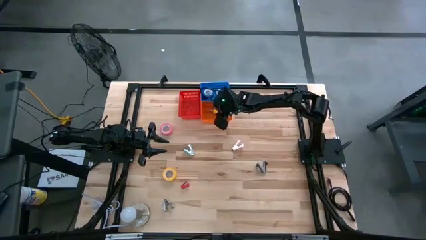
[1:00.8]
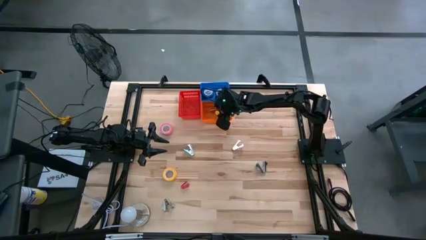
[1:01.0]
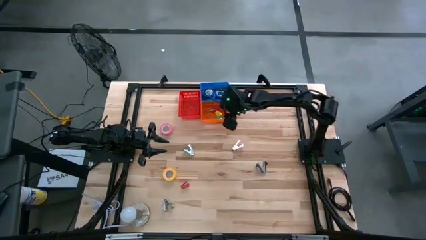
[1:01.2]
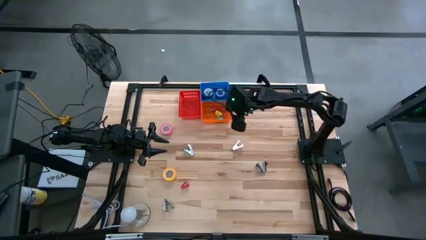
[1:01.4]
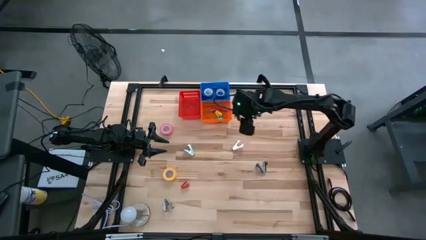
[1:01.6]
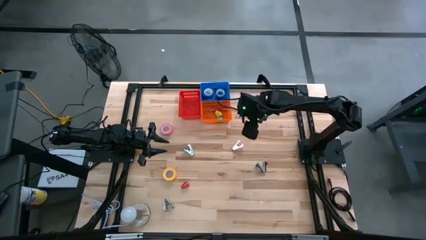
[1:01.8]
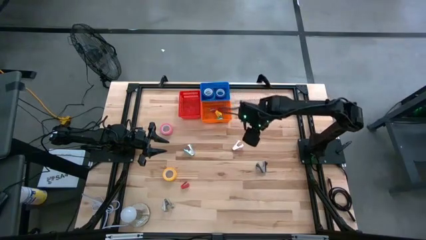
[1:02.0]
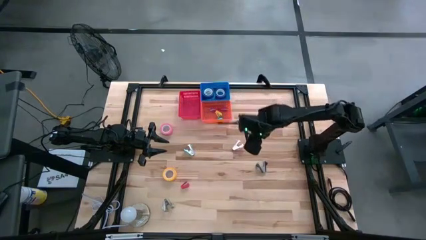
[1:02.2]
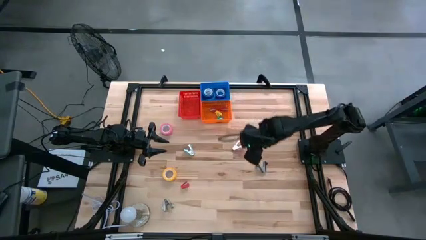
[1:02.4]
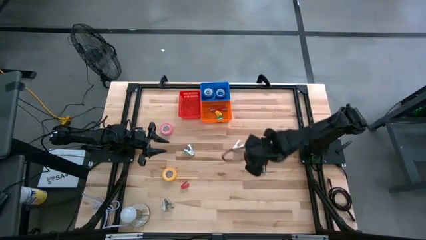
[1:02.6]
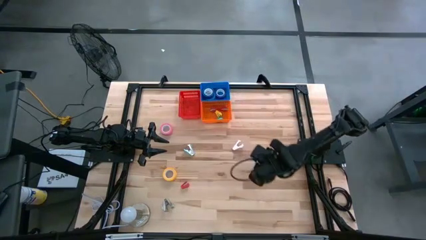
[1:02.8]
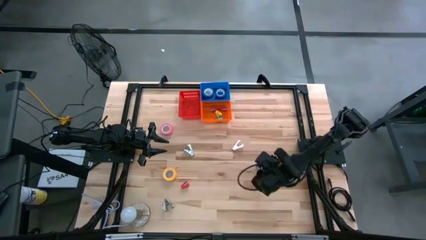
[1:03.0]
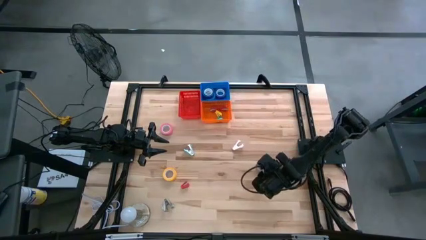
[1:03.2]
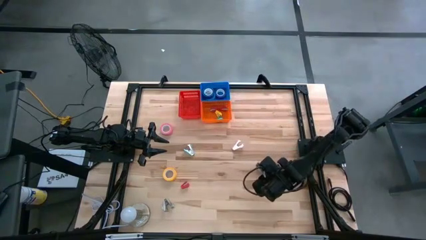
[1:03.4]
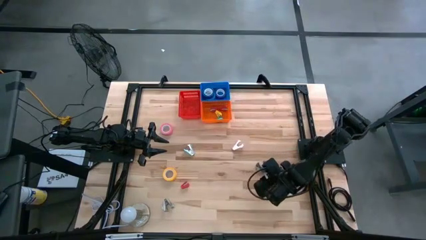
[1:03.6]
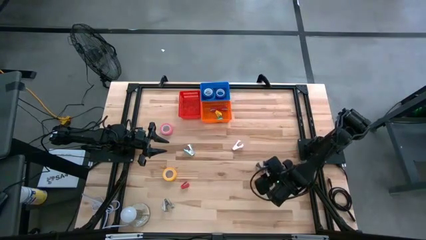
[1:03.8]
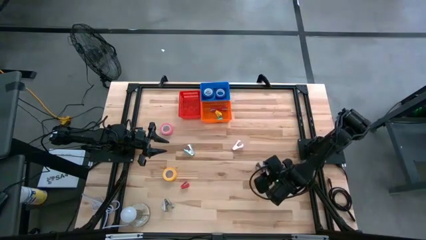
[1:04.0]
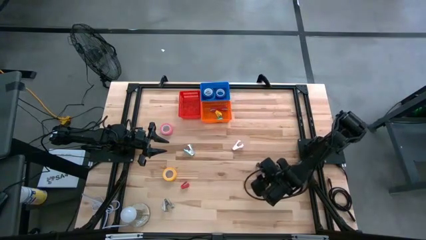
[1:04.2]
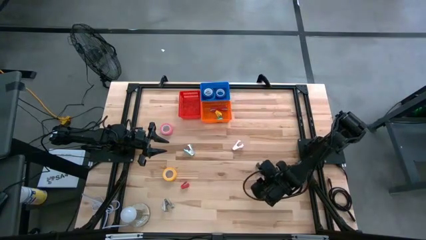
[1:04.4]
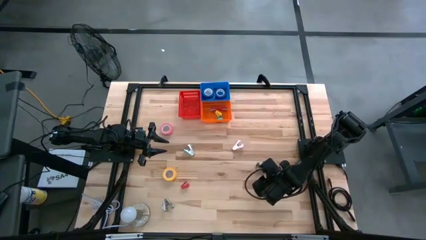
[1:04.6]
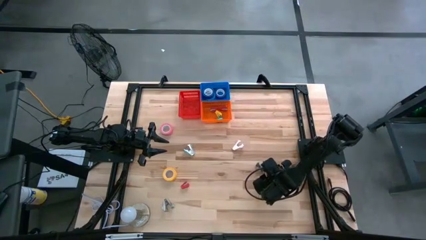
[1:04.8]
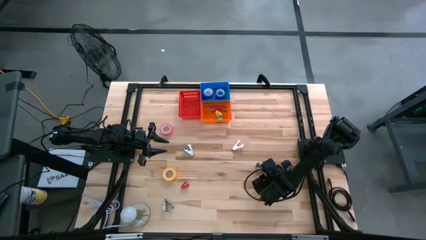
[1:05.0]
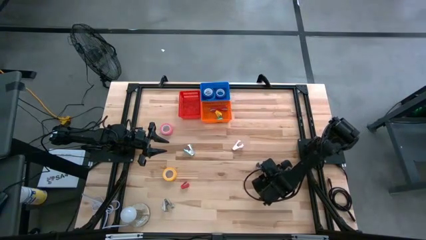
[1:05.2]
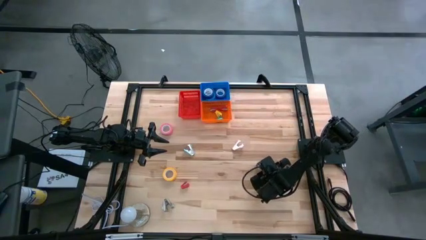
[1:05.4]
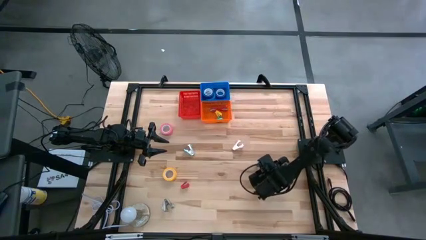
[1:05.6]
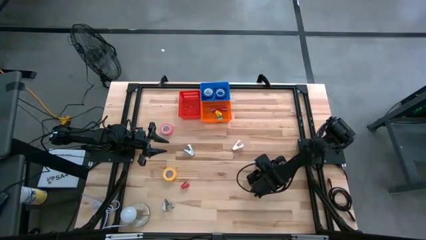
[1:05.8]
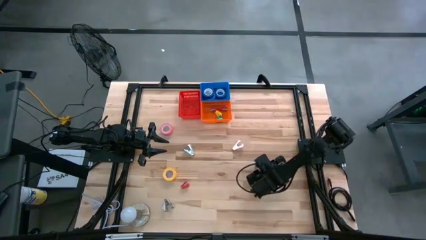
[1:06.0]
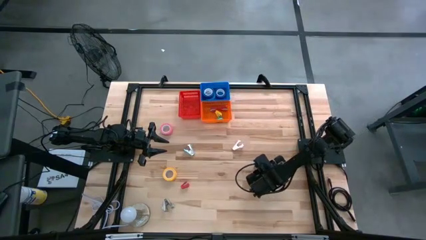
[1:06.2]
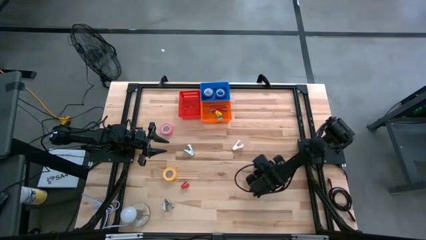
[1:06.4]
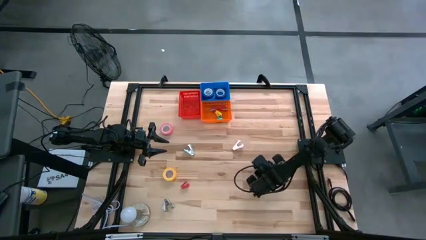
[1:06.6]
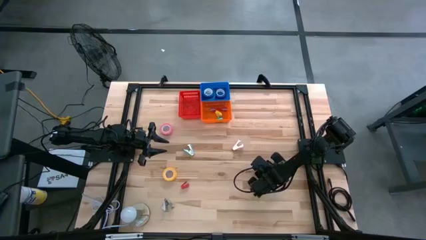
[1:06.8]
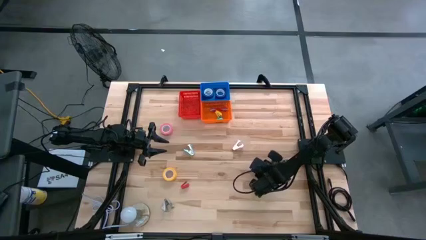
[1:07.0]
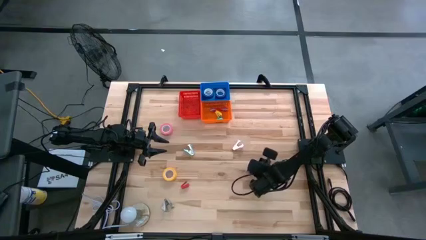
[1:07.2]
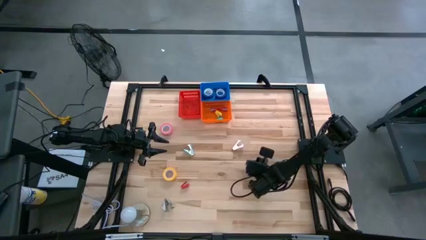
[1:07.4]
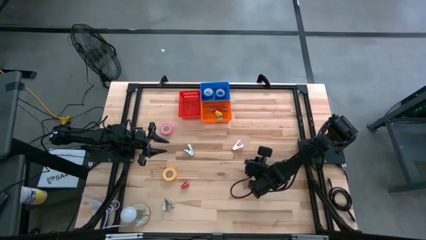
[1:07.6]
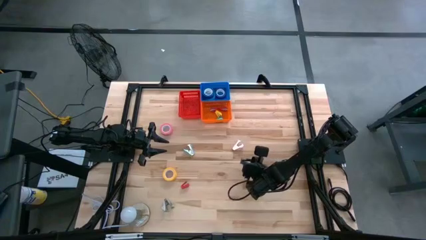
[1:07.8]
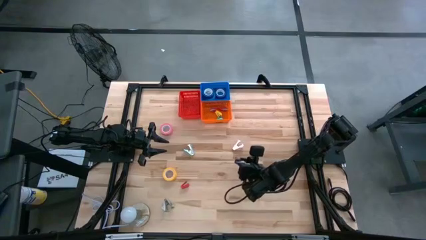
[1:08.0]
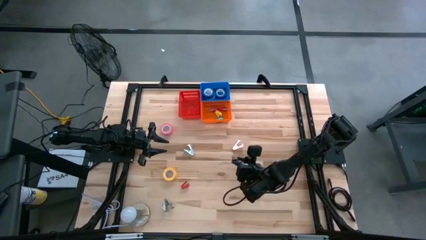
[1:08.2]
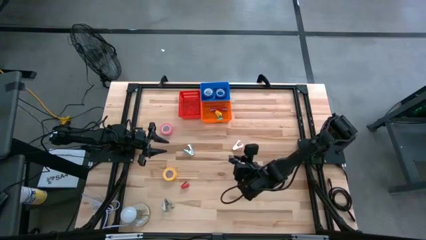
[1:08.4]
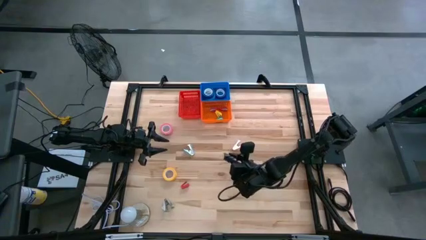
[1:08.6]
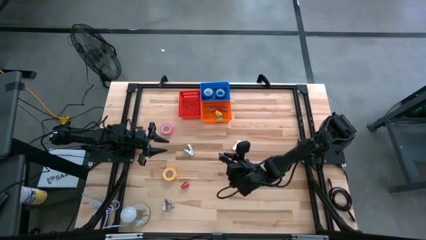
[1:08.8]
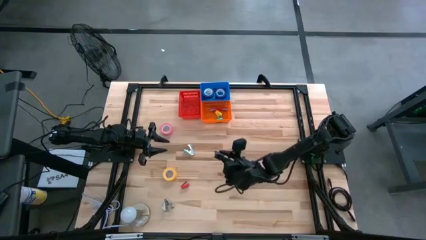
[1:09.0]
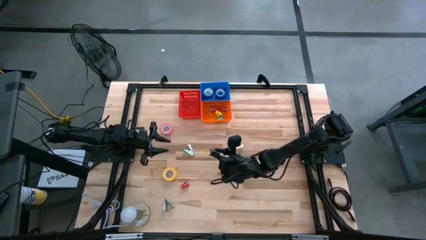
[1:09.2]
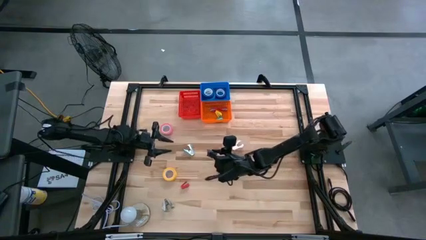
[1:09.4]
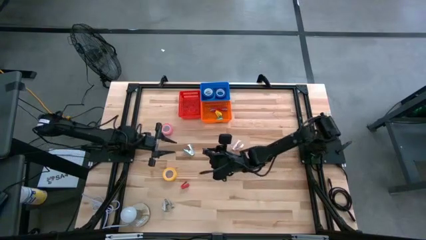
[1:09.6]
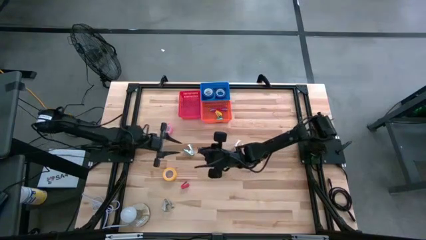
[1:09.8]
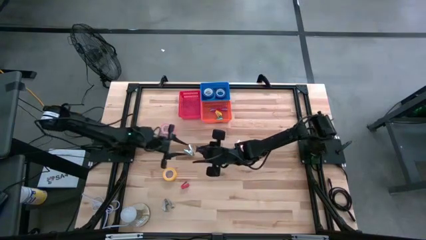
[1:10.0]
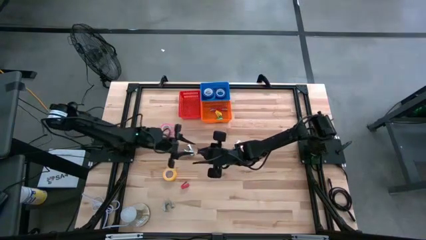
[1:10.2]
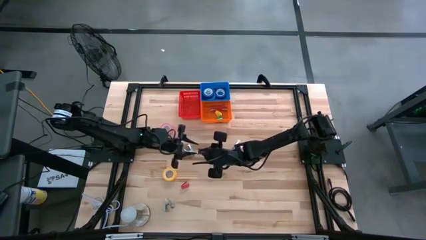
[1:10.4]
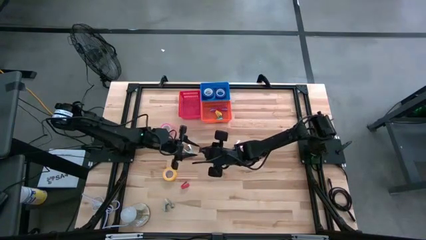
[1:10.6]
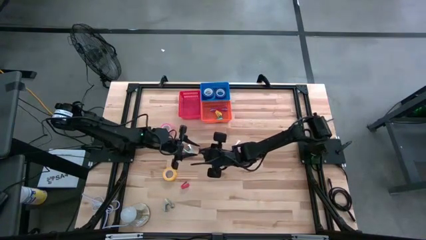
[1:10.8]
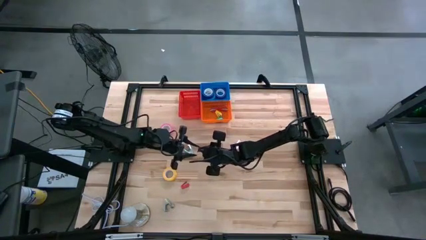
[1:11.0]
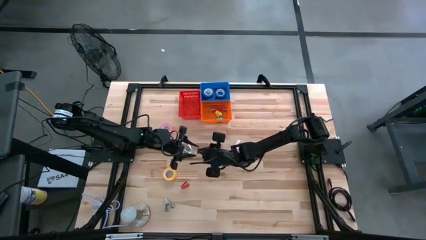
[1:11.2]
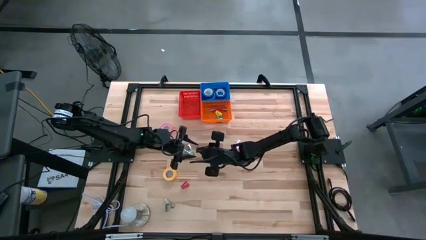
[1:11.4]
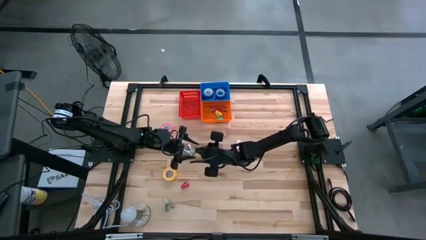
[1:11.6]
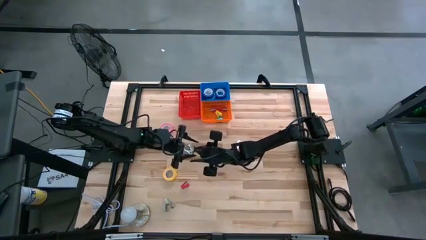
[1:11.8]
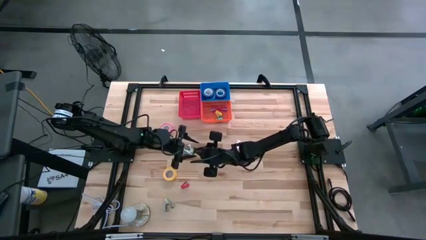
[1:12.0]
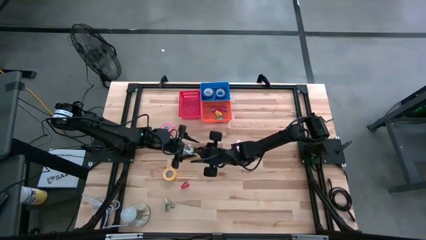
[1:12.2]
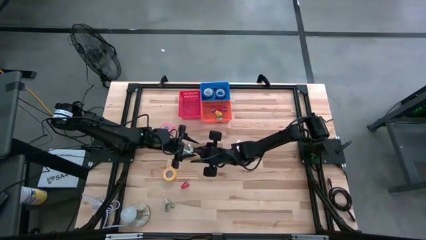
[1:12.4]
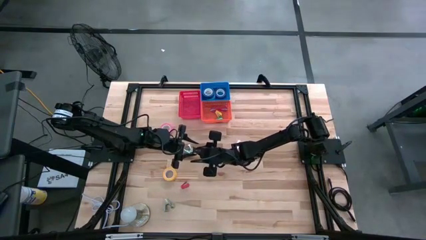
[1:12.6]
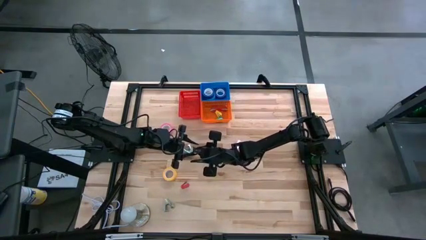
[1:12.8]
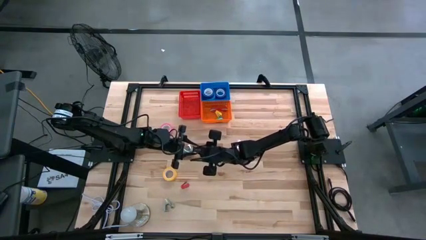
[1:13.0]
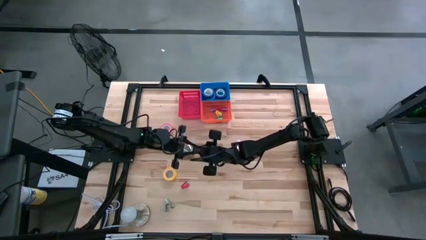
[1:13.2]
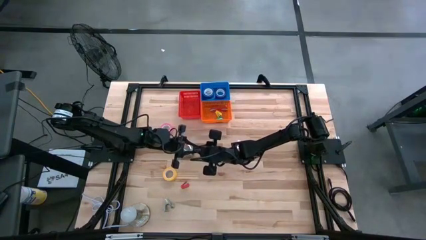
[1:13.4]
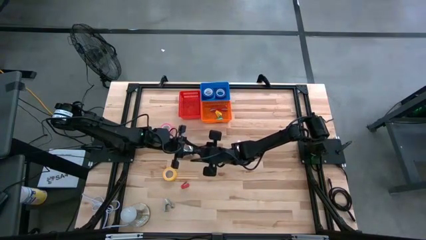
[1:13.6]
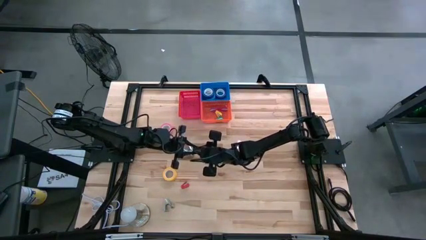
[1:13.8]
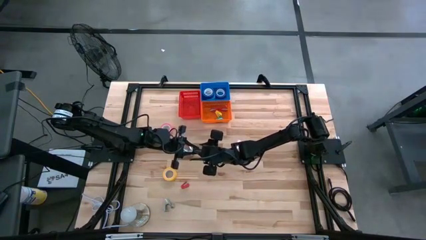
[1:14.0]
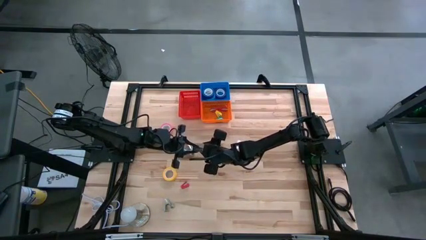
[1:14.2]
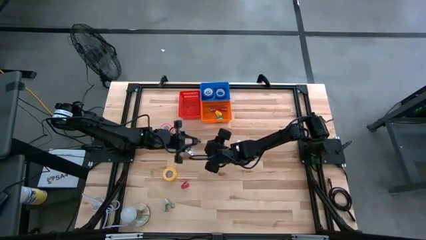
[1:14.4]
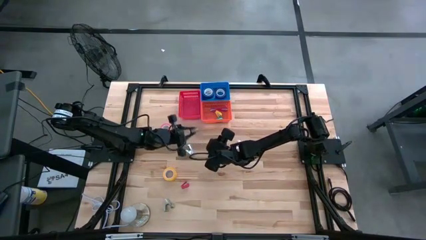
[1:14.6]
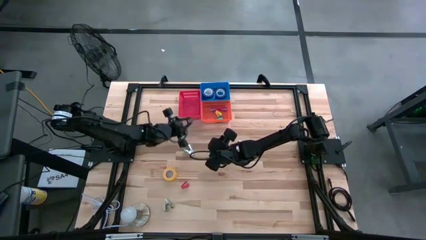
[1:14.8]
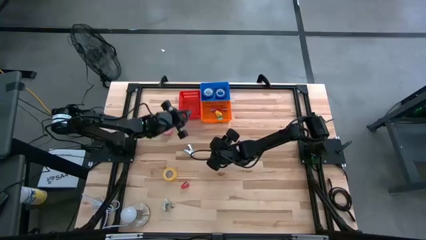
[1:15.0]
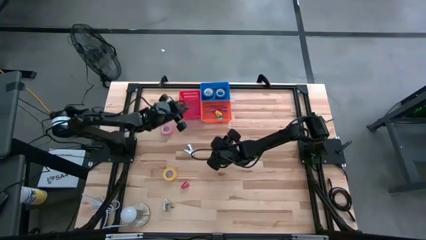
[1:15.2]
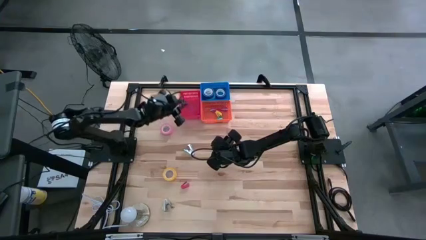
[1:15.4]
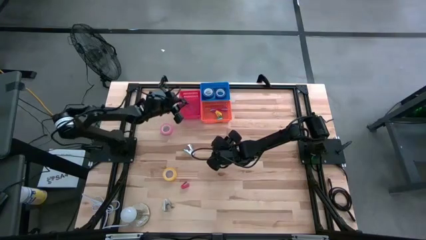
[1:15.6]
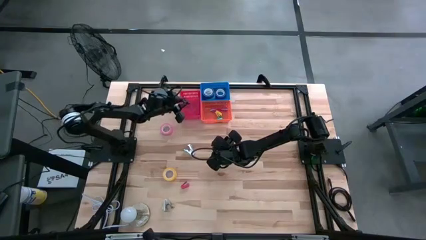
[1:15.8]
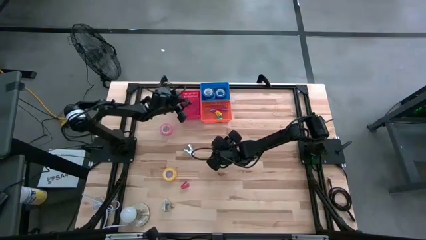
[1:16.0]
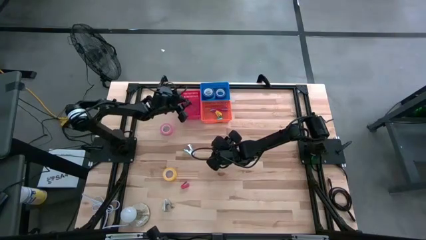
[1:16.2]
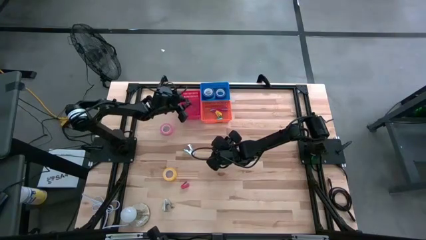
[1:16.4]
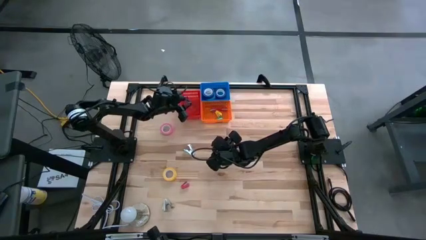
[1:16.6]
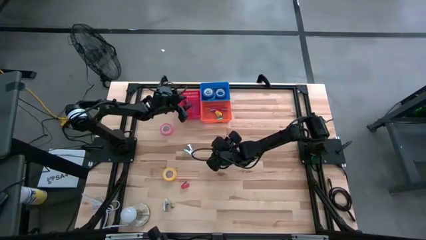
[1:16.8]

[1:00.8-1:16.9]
Task: Pick and place Stapler, Stapler remover, tape
Put the black staple remover into the red bin
